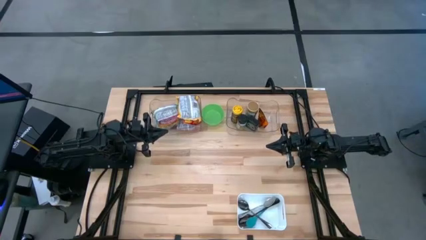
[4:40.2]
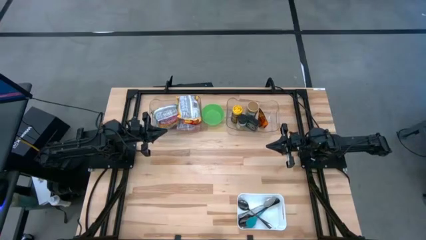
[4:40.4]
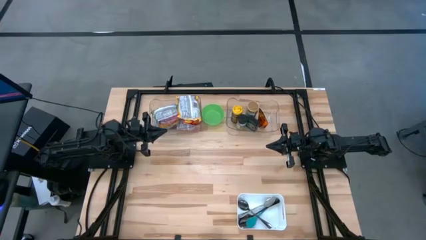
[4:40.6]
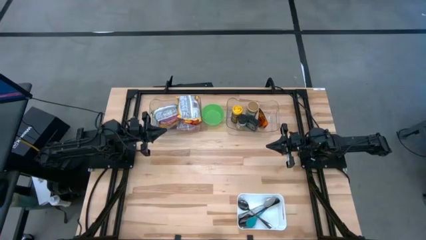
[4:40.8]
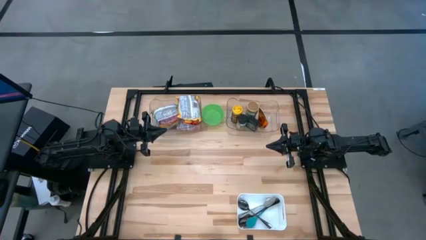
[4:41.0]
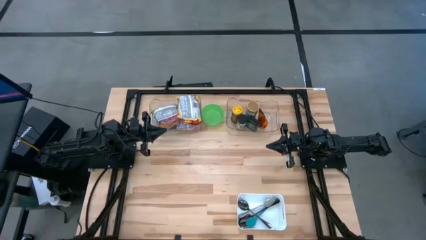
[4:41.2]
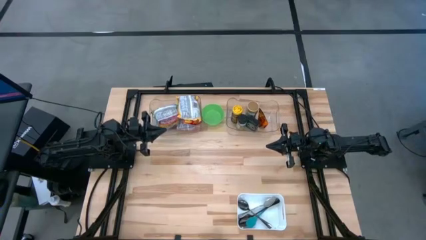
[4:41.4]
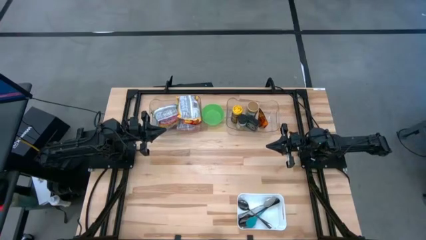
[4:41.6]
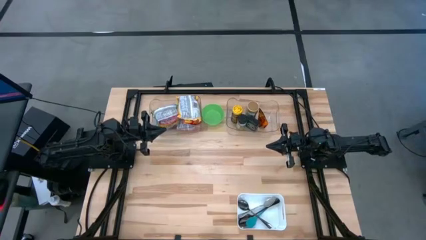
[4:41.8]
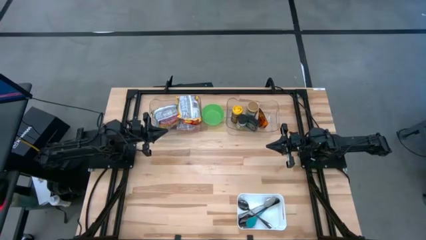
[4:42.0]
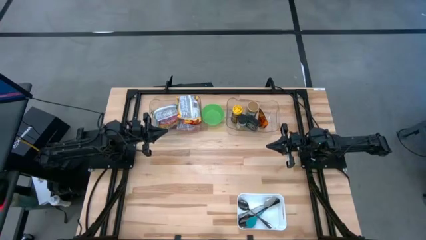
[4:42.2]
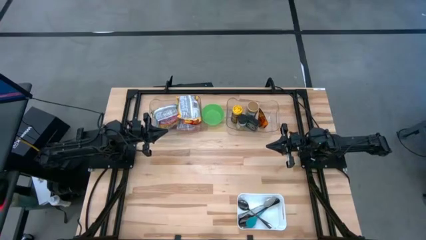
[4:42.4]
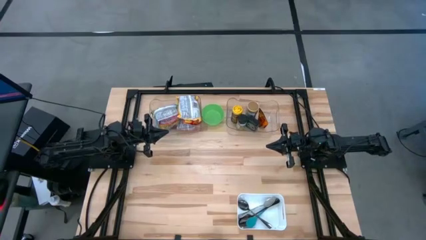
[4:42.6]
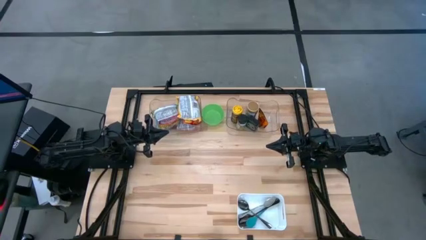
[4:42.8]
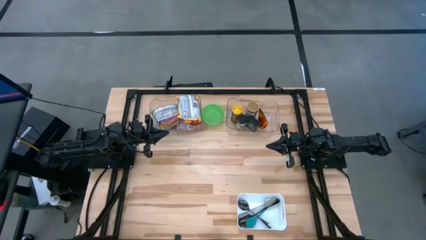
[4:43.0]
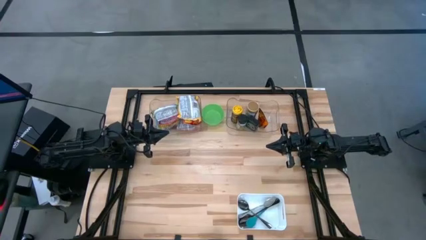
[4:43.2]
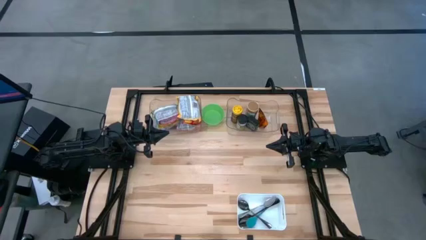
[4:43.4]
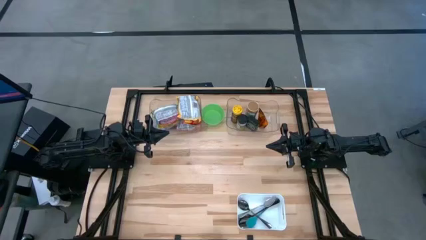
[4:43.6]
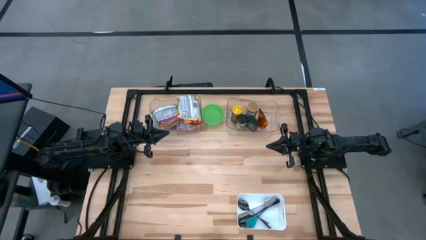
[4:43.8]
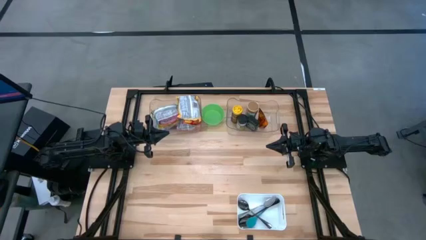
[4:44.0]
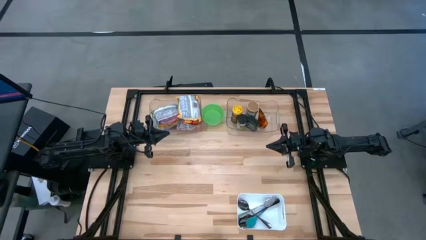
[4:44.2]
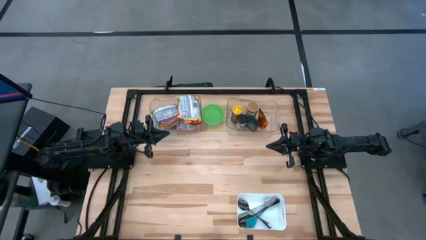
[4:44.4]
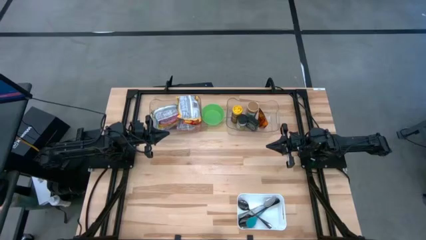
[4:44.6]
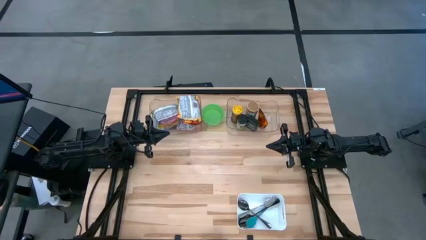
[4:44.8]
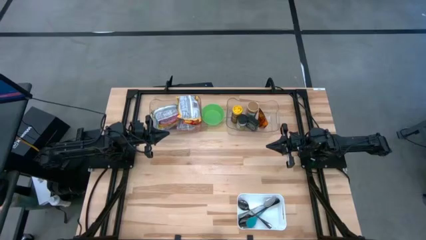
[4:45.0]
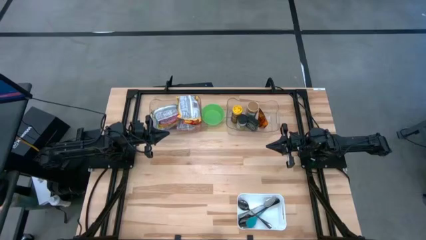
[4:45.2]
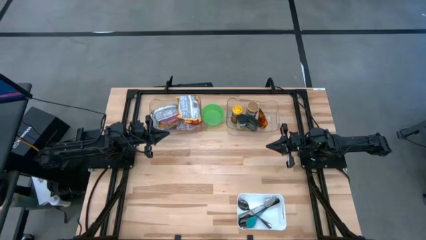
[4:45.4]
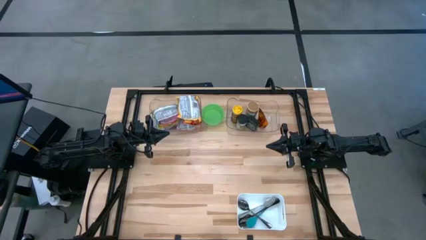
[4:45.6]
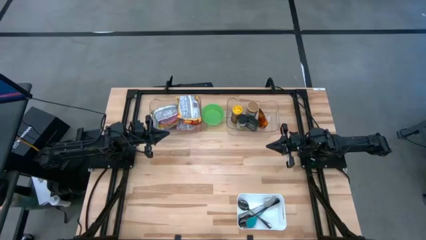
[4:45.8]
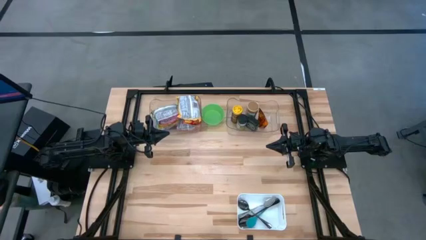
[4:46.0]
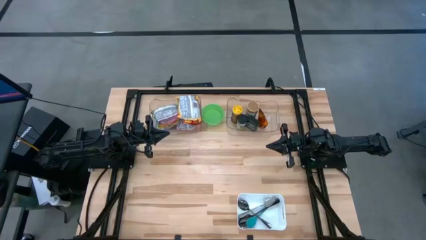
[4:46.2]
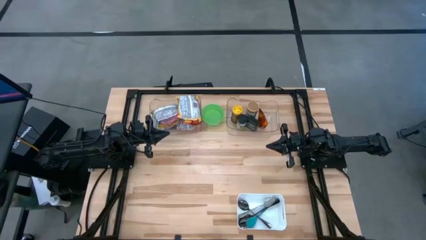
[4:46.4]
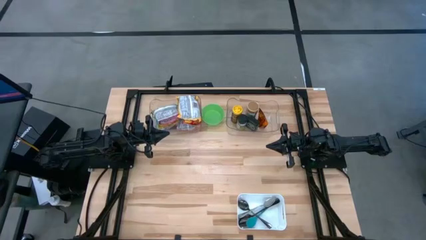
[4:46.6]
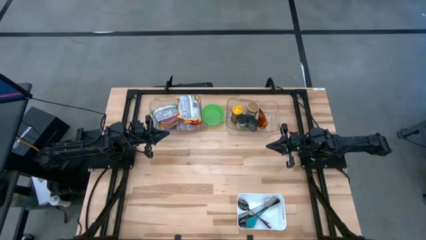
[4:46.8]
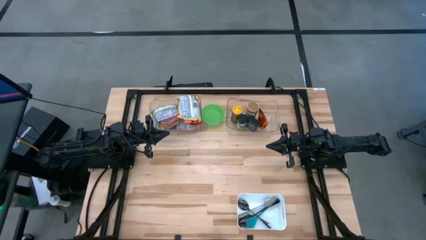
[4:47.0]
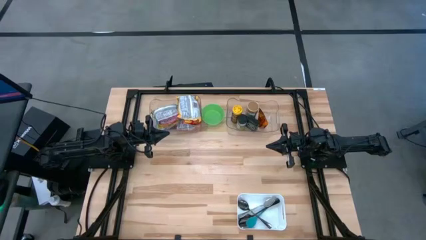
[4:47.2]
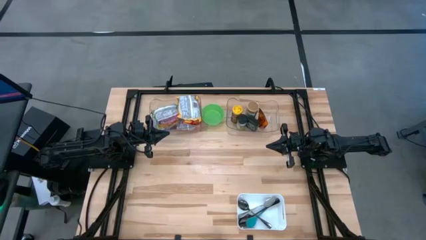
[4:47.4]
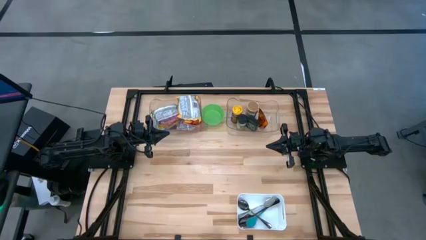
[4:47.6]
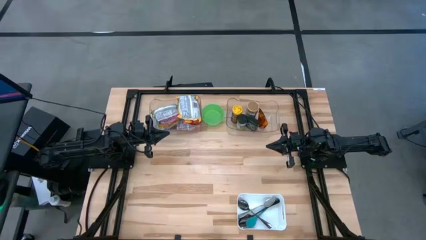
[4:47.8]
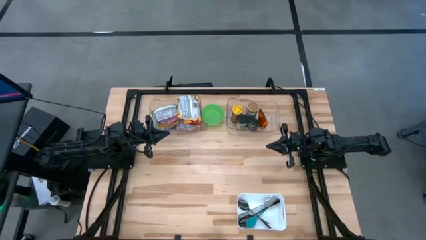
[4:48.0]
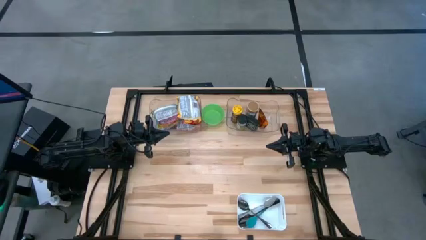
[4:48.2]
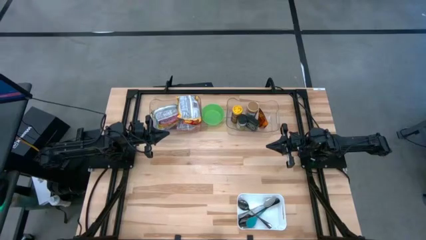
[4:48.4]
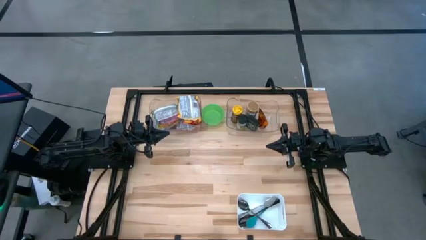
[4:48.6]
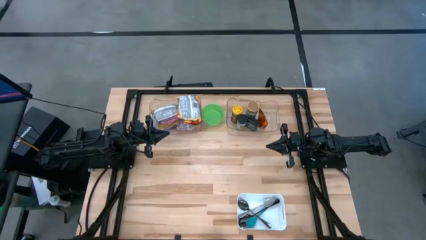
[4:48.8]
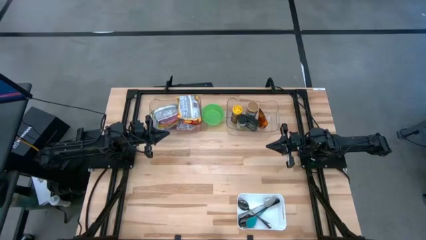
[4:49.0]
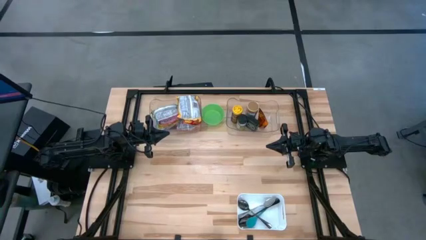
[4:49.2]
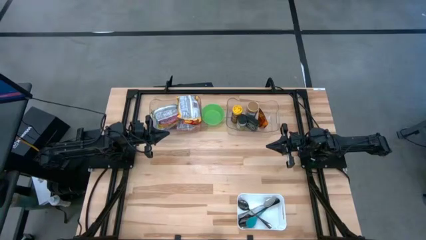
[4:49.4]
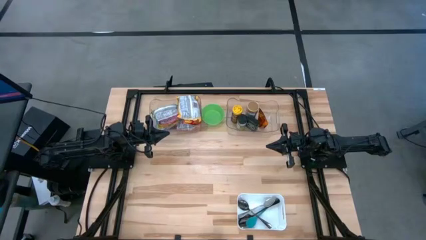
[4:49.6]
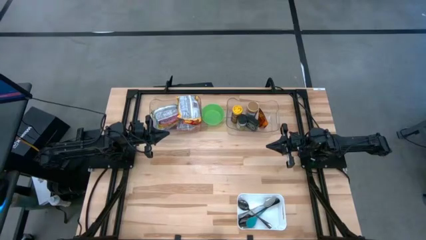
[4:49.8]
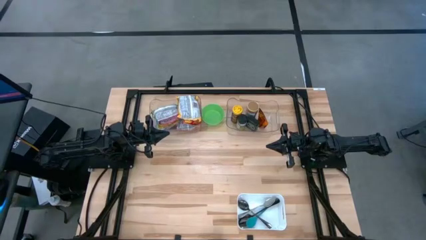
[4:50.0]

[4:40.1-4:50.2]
Task: Pick & Place Food Item
Return to Home Position

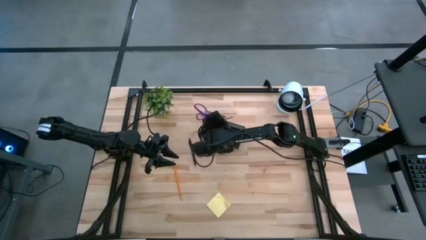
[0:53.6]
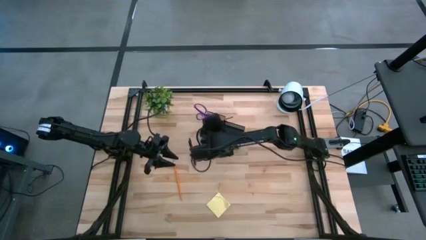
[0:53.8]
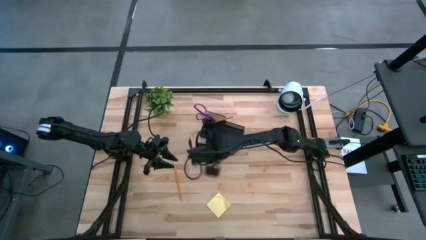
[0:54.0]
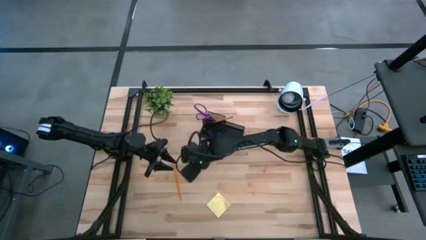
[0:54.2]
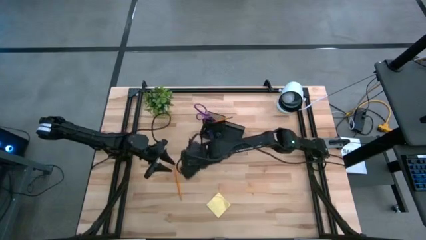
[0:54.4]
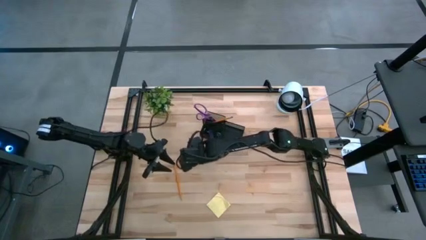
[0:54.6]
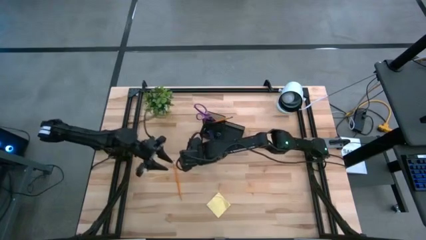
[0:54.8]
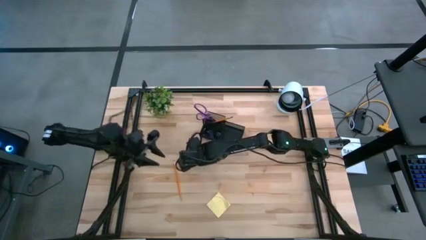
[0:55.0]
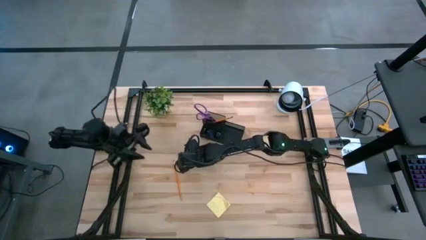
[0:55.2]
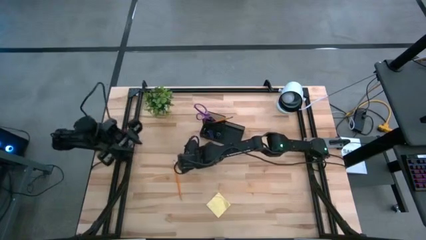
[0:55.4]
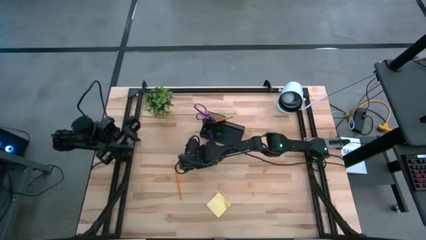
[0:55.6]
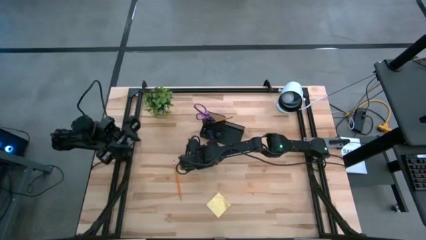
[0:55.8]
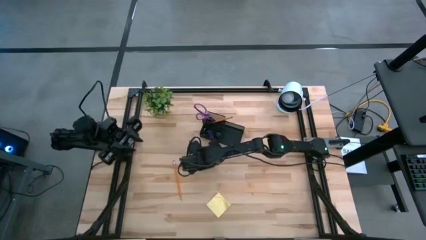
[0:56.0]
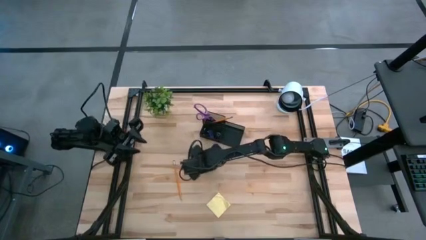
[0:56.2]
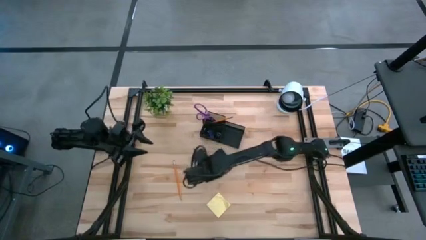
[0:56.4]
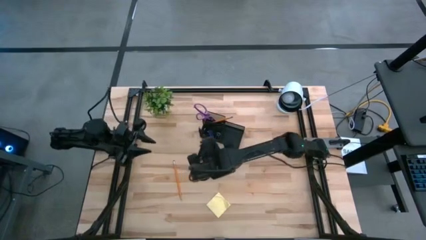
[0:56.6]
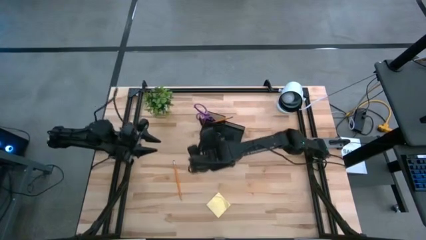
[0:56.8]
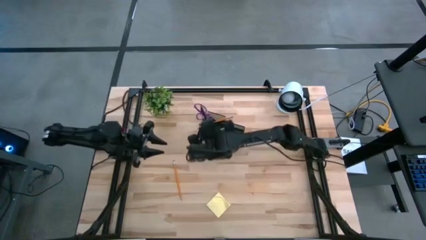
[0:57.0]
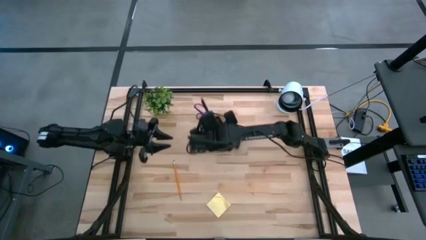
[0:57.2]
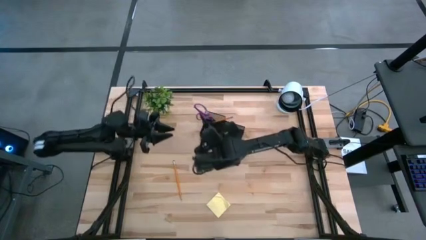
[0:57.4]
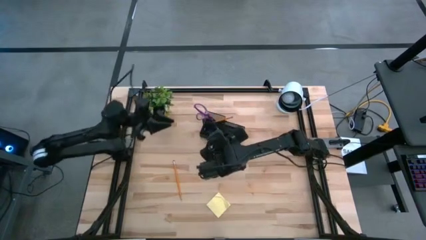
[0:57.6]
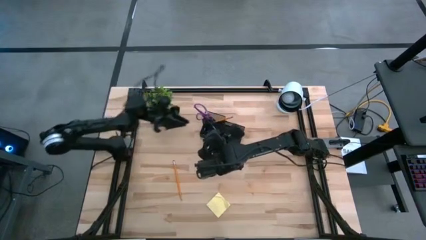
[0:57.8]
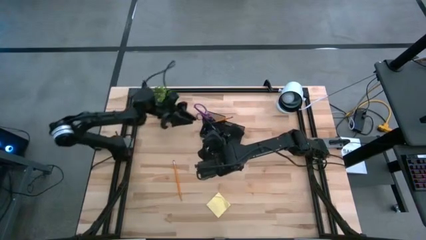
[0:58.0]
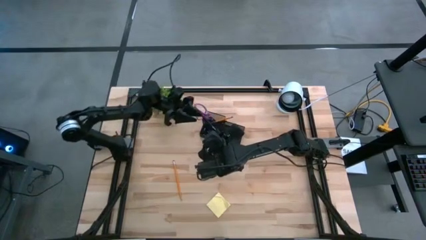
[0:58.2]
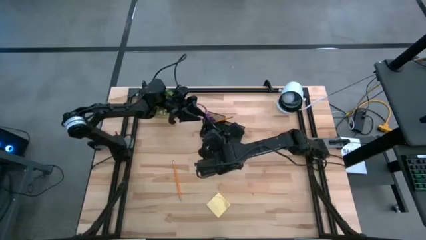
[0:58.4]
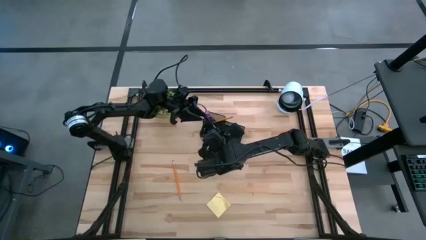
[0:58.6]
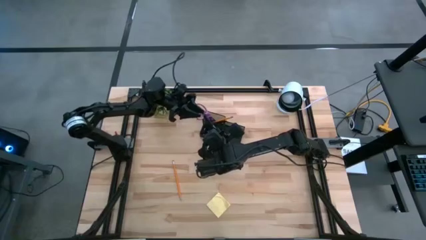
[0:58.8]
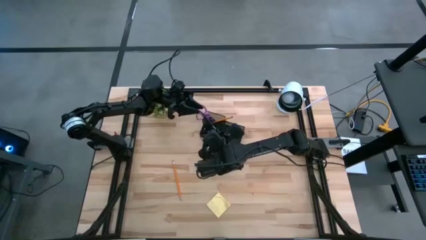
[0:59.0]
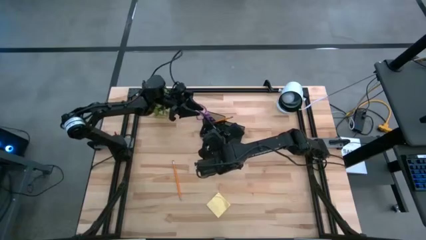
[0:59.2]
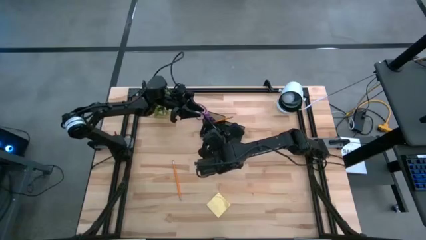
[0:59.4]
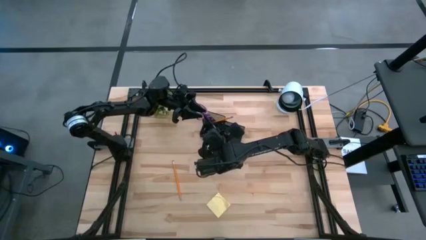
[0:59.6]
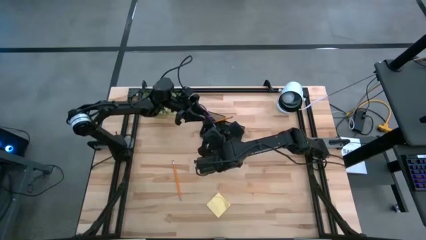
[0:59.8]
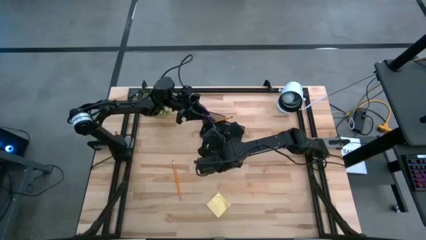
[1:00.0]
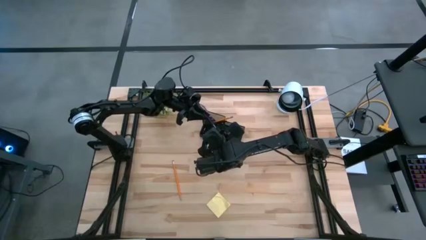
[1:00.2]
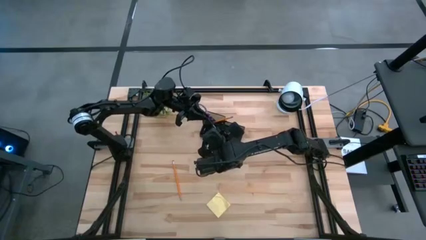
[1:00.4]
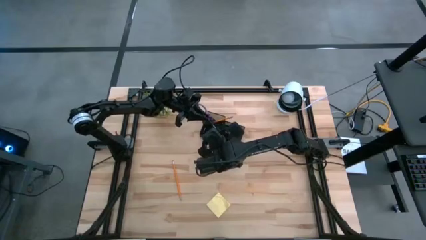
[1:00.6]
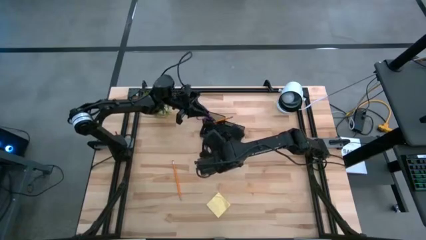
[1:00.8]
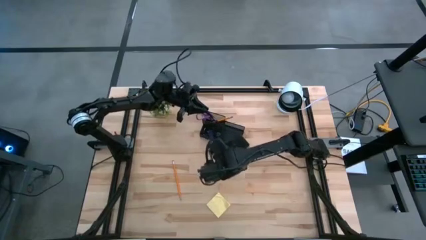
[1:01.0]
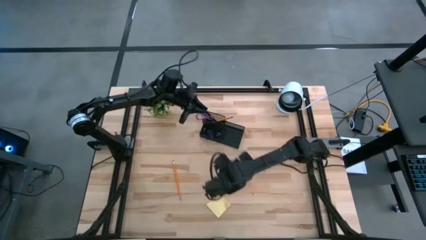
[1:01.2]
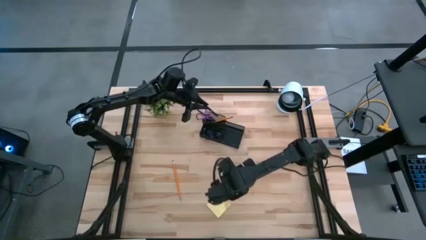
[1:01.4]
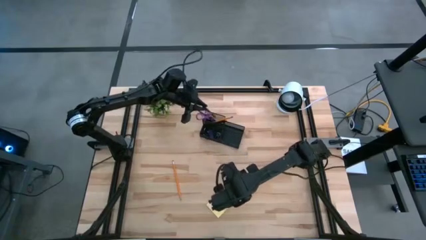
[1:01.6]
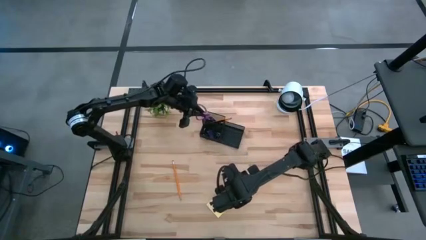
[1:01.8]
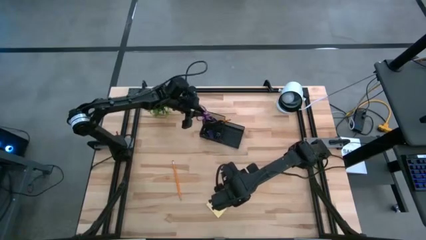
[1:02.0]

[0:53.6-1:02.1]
Task: Pick and place office supplies into organizer
Put the black pen into the black desk organizer
